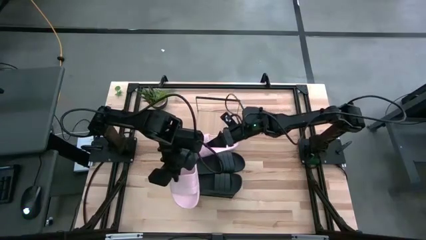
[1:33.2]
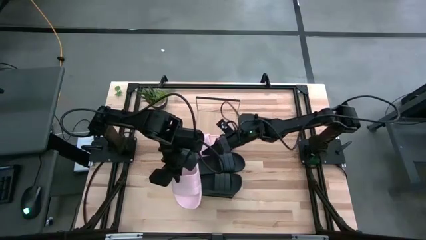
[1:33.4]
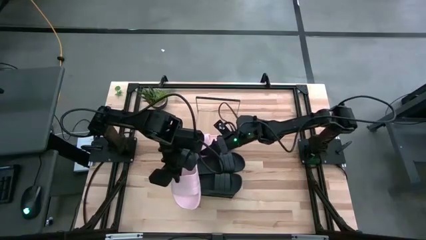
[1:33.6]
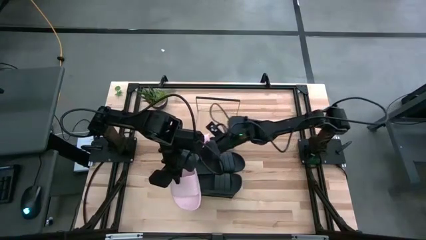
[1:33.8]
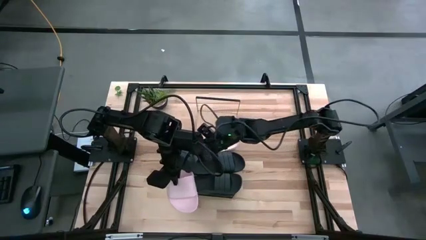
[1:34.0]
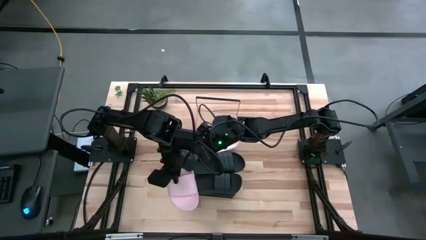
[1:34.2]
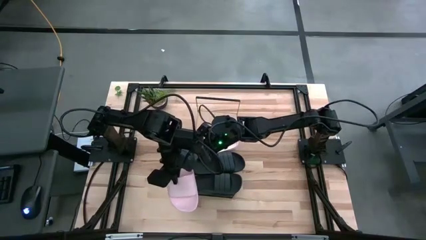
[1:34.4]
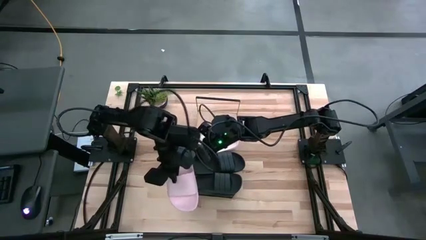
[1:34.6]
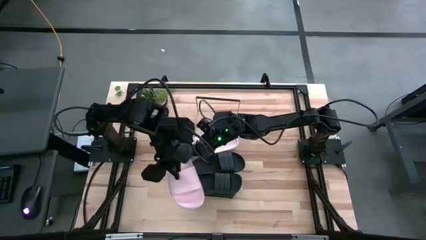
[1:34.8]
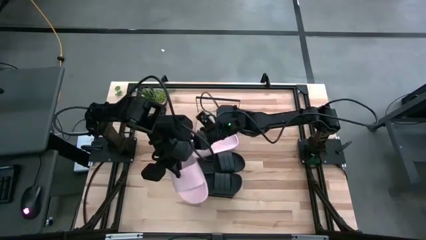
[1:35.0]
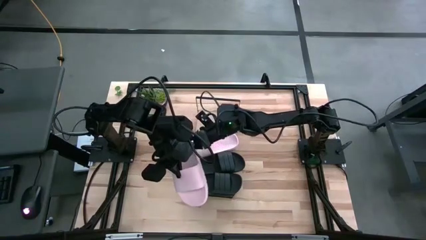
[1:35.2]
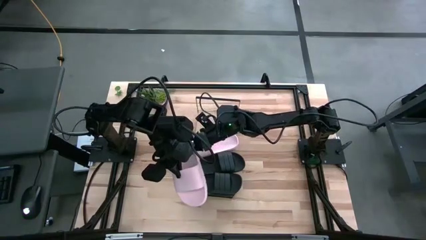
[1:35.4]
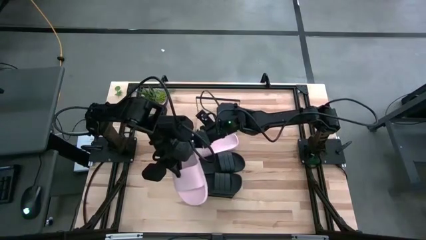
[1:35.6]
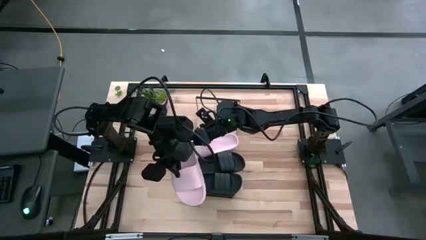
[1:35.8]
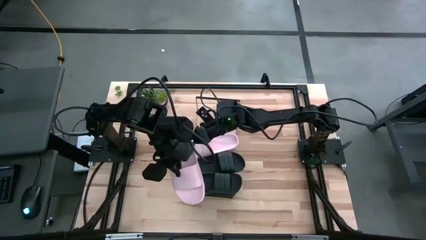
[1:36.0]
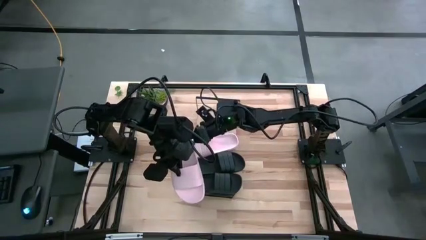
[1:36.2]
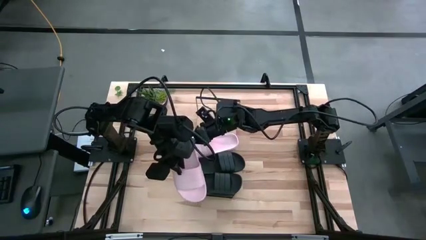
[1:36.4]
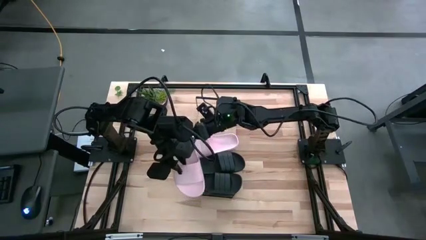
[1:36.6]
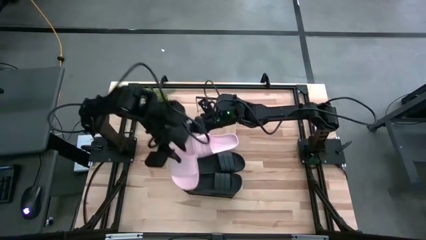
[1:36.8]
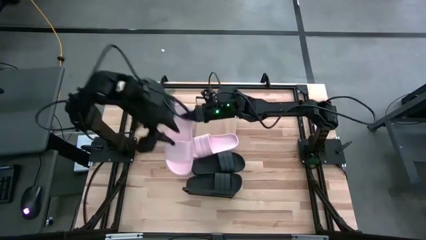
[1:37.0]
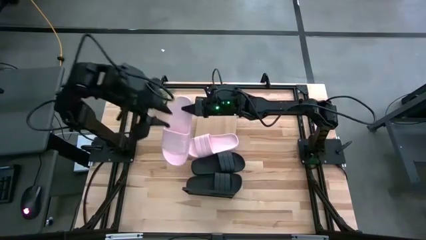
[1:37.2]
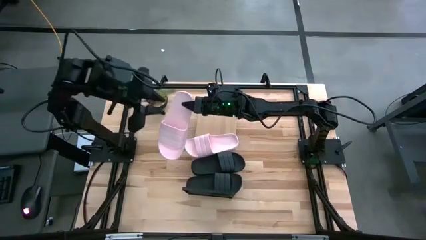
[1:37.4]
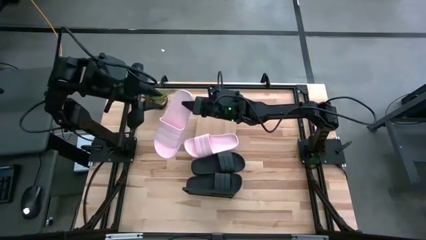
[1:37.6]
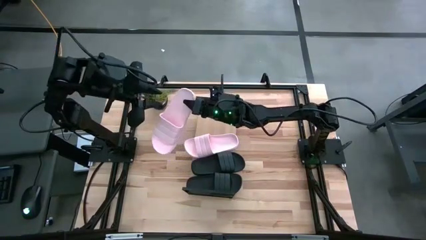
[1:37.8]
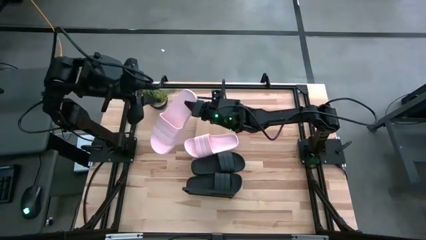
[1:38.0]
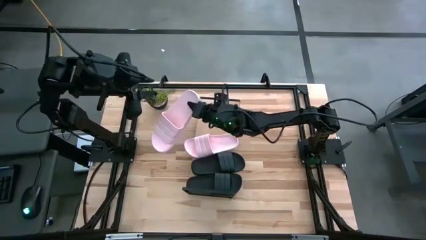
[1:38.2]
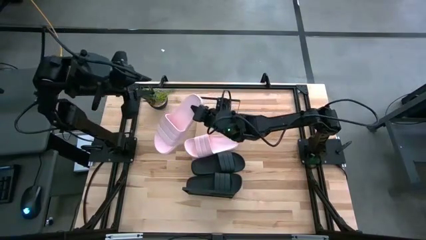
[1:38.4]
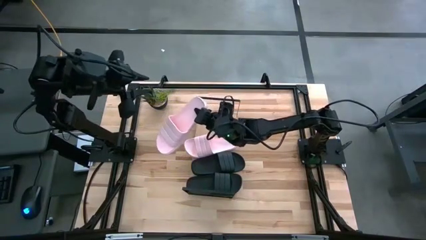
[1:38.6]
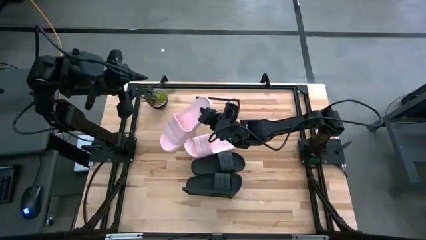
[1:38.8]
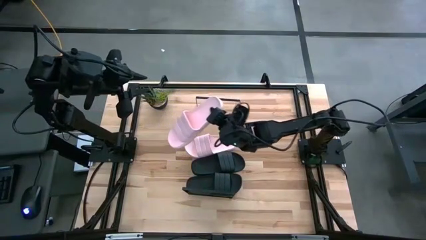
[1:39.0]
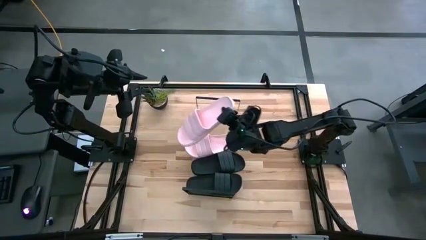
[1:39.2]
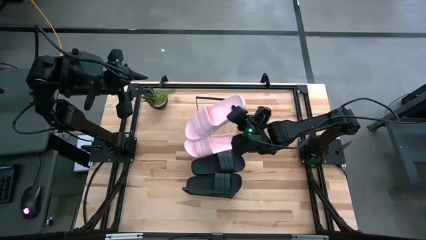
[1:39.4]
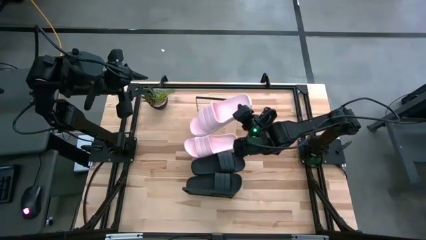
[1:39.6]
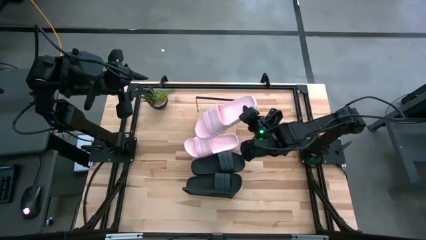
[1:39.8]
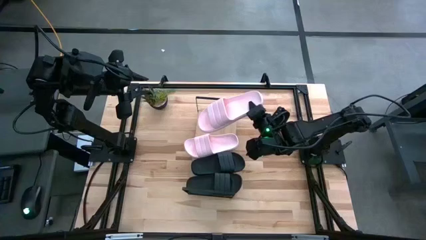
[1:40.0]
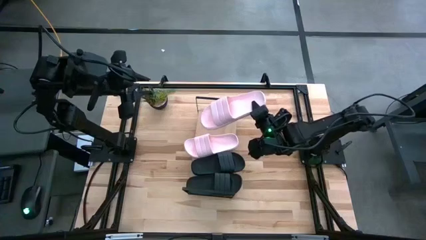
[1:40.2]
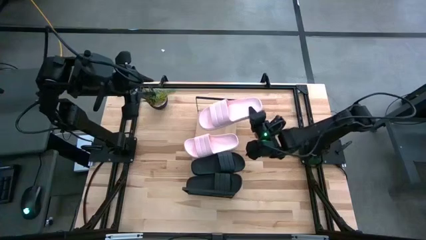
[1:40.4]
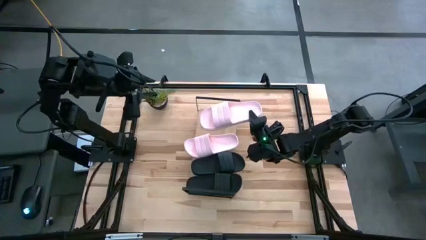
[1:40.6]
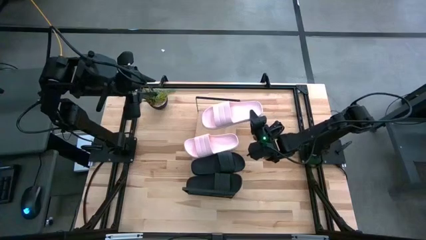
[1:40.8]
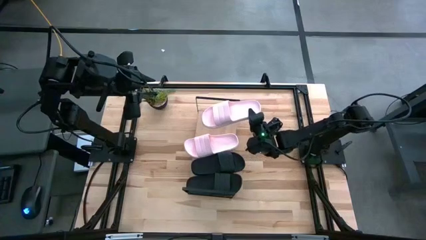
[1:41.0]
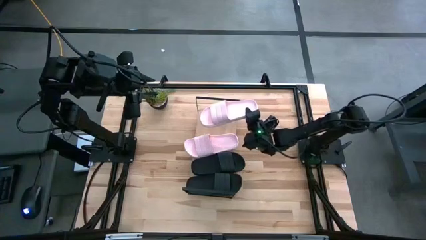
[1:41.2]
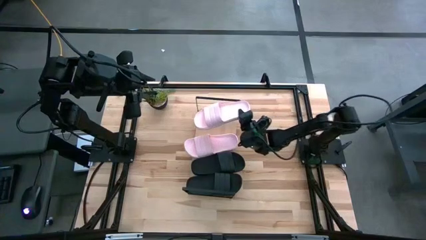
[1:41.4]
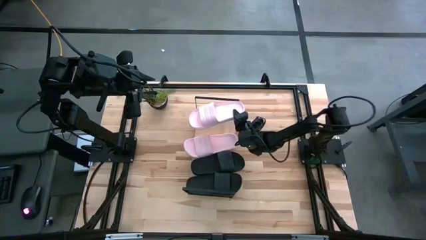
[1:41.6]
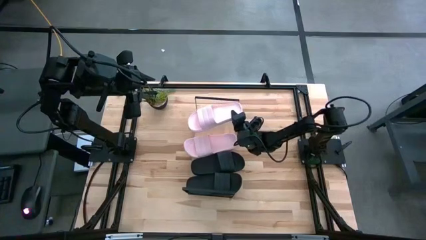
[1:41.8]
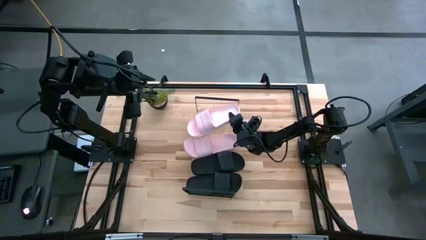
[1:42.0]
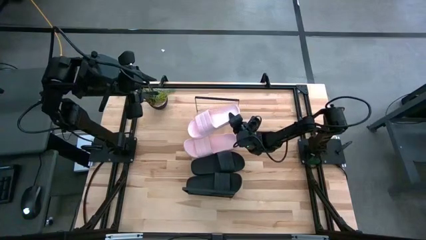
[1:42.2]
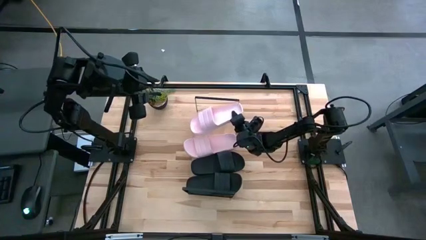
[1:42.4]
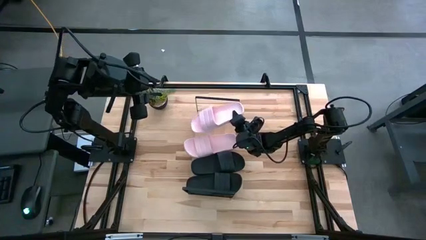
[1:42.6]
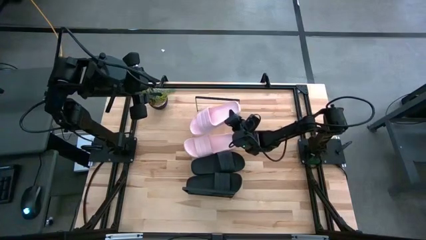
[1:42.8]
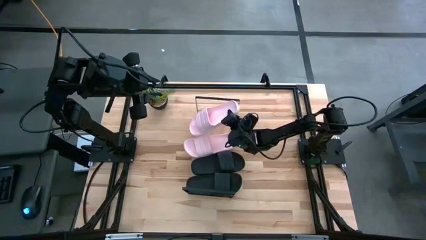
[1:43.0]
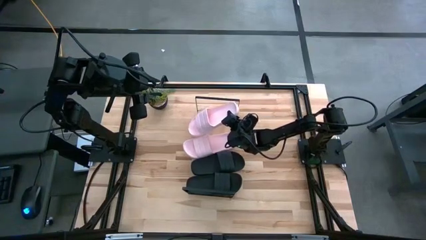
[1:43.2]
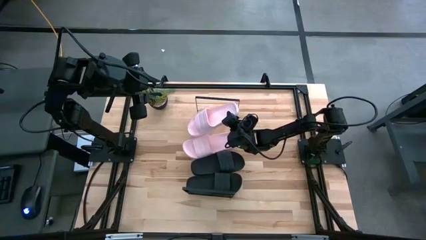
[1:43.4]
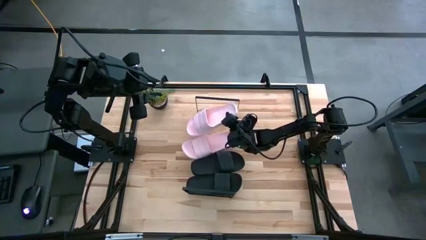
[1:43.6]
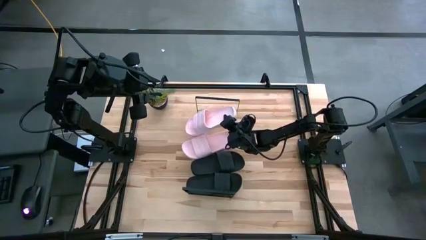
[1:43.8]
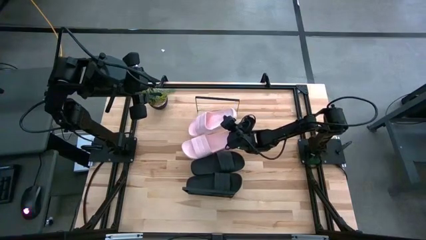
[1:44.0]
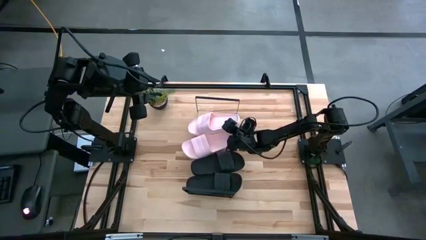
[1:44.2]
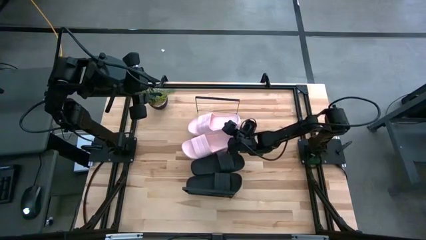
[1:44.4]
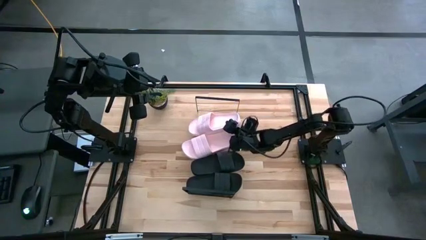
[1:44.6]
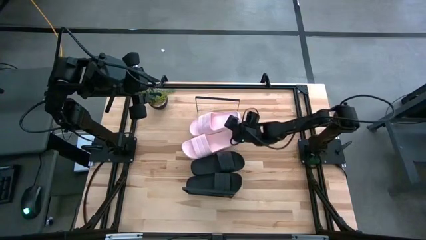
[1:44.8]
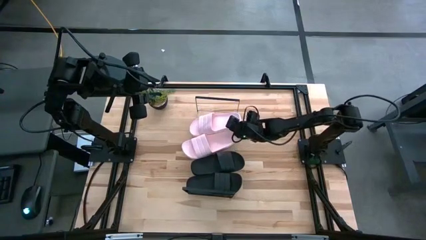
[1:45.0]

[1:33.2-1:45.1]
Task: Pick and place slides into the shelf
Put the pink slide on the shelf

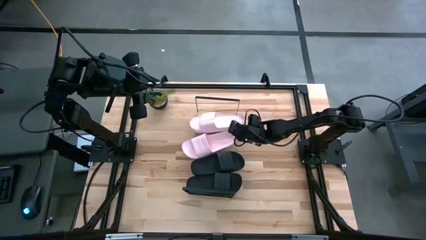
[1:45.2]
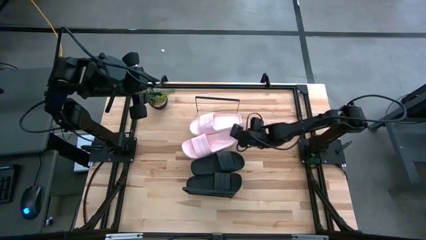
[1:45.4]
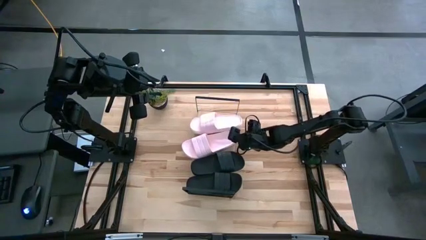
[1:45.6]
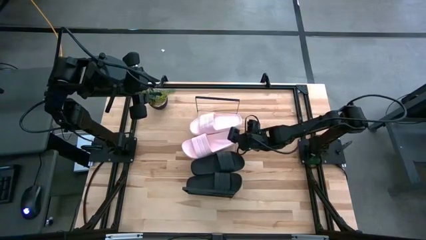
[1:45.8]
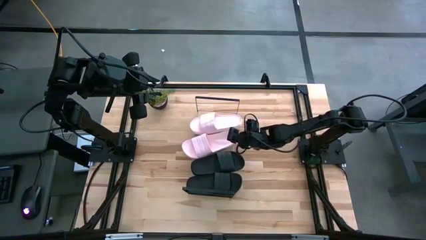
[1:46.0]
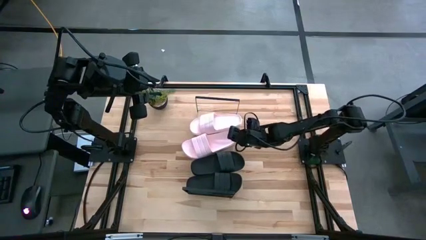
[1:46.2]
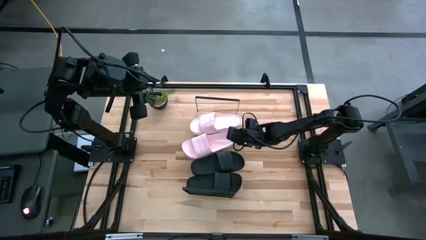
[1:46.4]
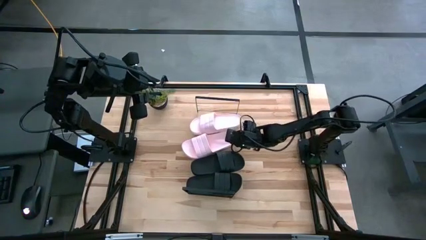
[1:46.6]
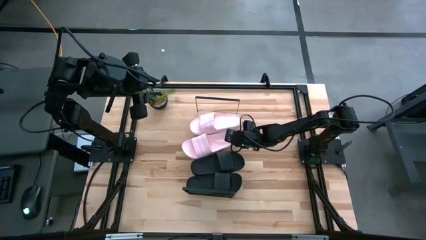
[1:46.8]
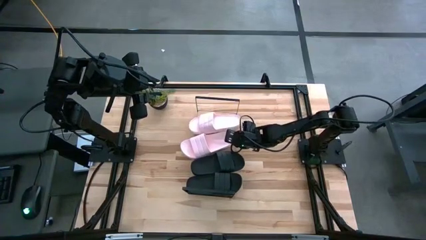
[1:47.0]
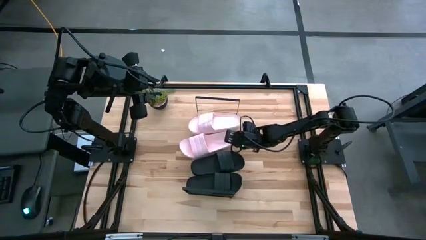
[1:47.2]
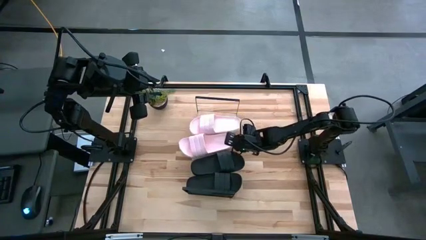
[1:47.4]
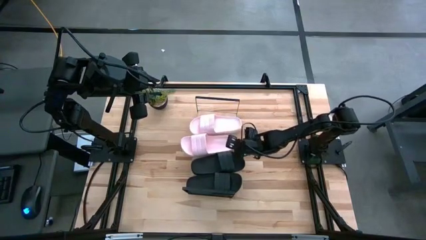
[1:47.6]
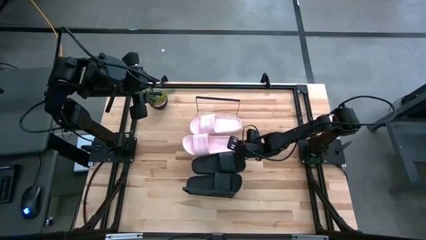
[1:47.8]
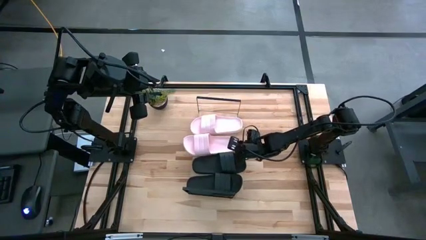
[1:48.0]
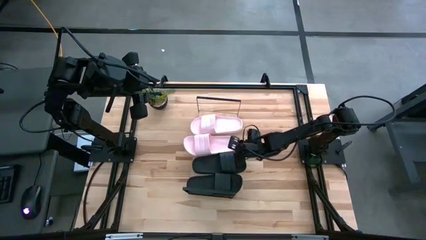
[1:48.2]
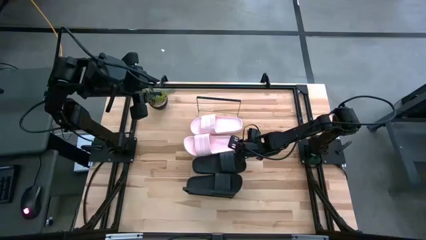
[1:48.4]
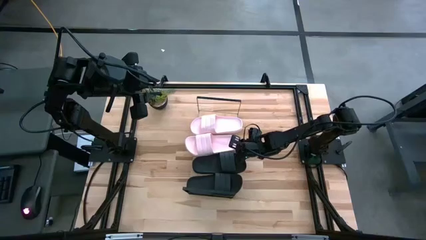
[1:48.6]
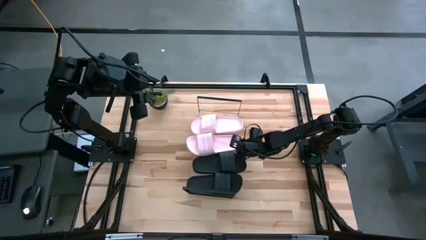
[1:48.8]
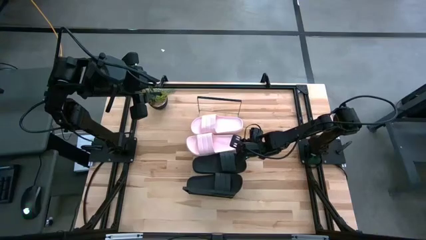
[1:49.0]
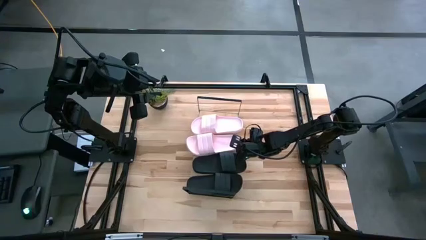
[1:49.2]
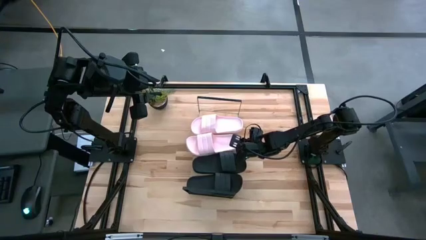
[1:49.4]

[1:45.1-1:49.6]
Adjust the pink slide on the shelf
